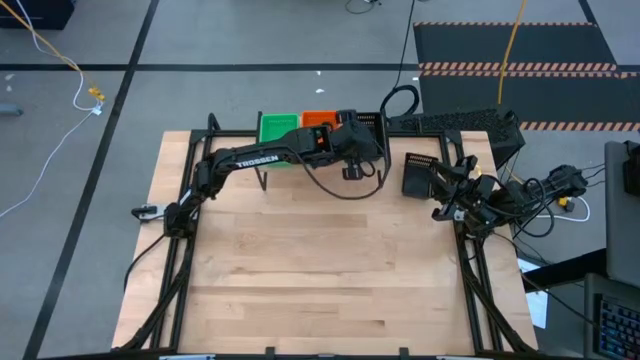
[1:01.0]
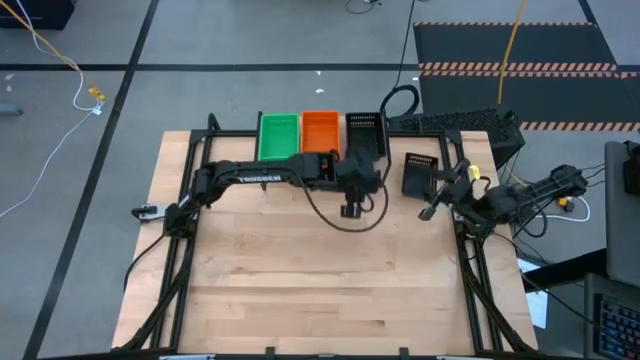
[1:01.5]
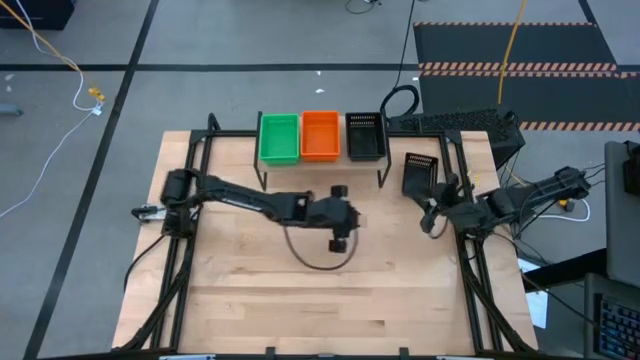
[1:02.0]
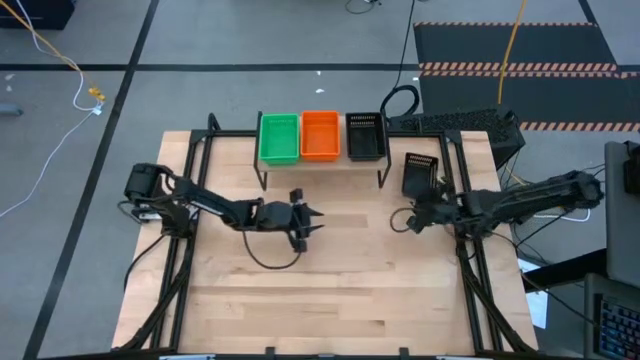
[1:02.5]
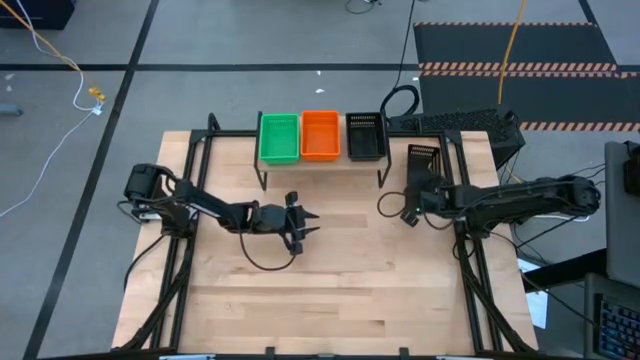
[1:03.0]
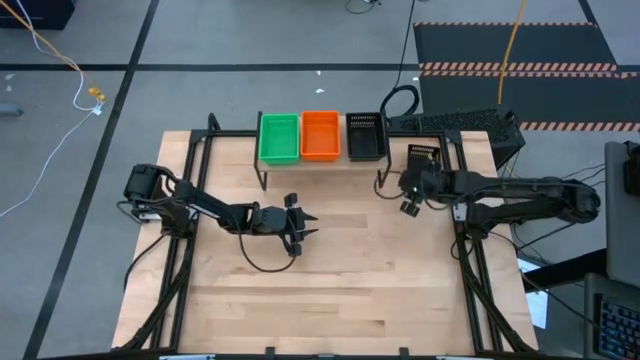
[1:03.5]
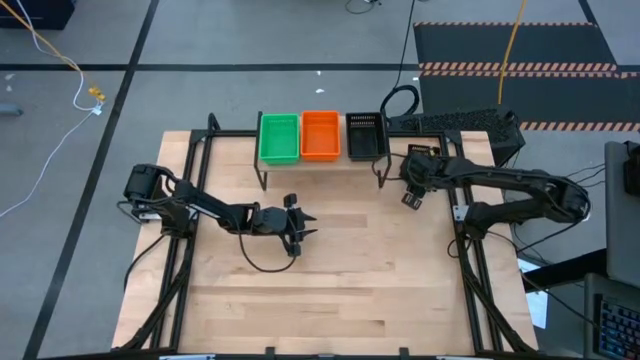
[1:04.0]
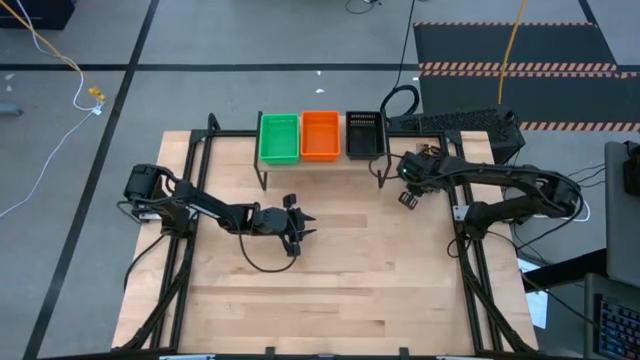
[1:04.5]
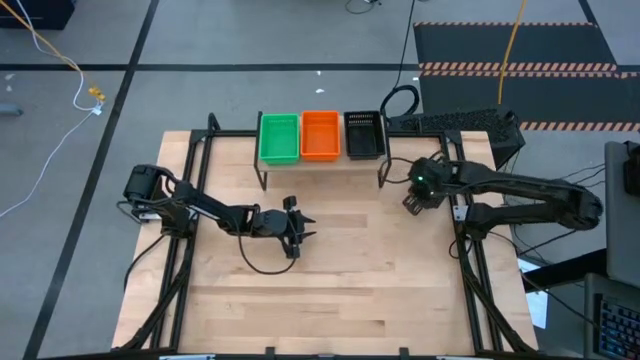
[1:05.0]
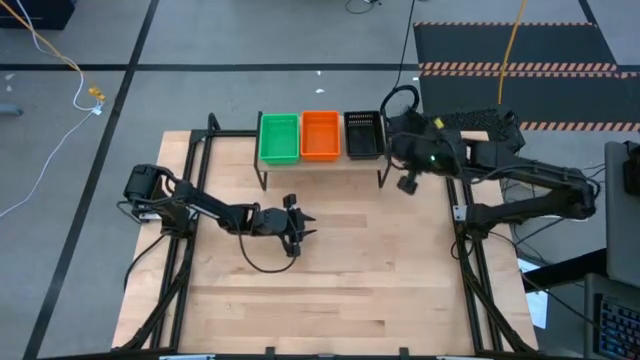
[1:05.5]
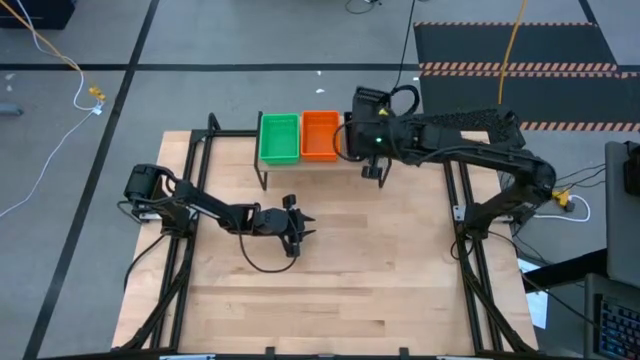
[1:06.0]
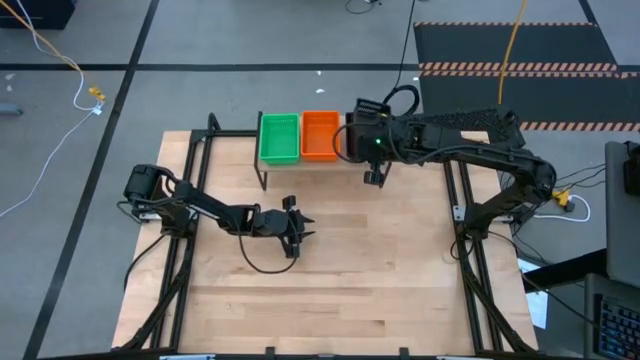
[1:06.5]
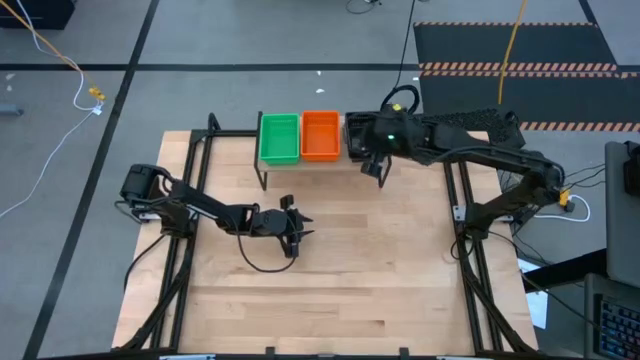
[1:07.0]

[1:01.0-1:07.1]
Task: Stack baskets on shelf by color
Stack the black bin on top of the black bins on the shelf

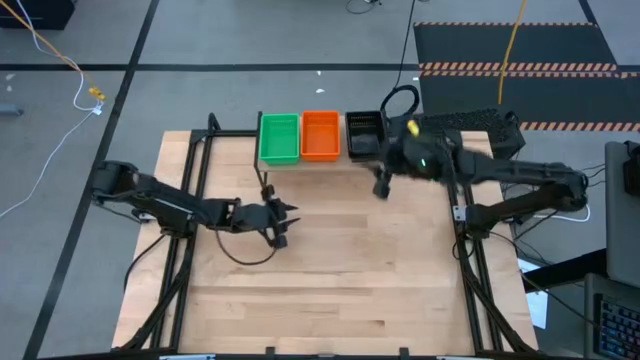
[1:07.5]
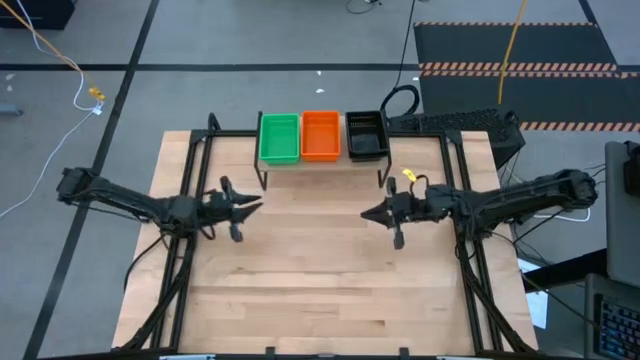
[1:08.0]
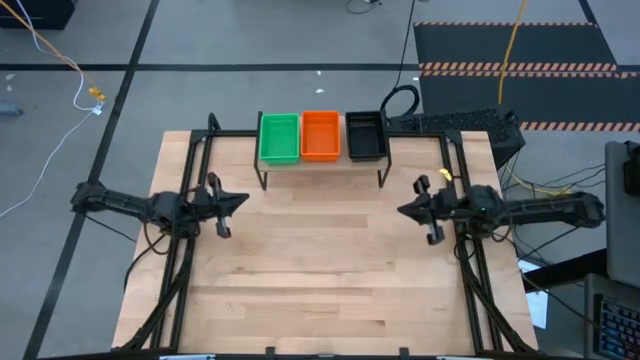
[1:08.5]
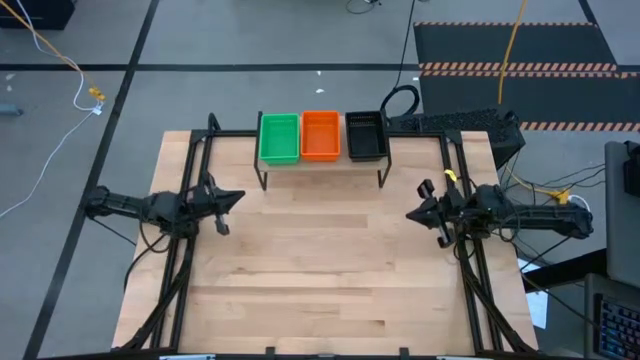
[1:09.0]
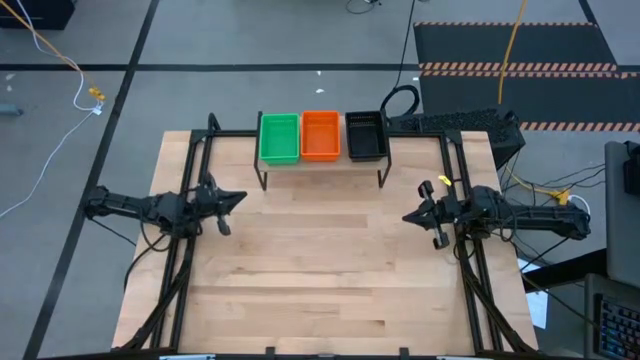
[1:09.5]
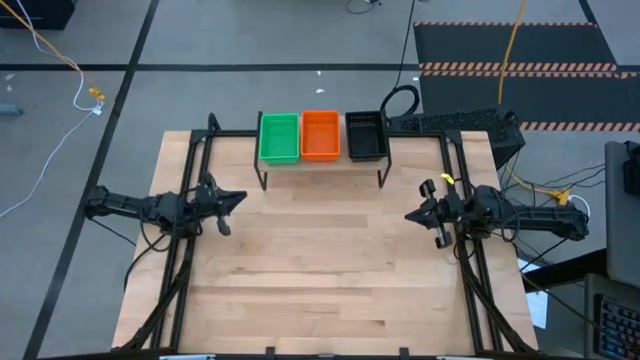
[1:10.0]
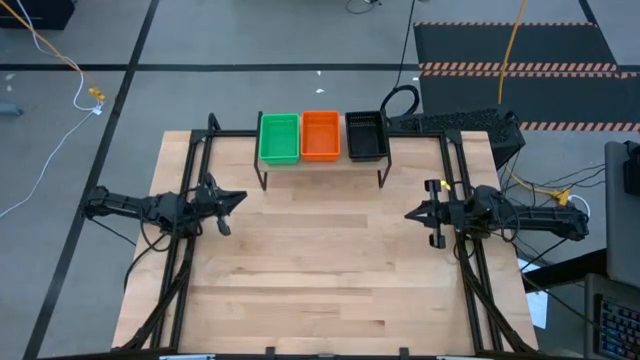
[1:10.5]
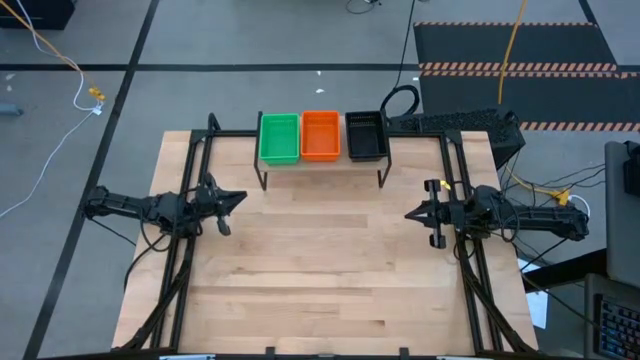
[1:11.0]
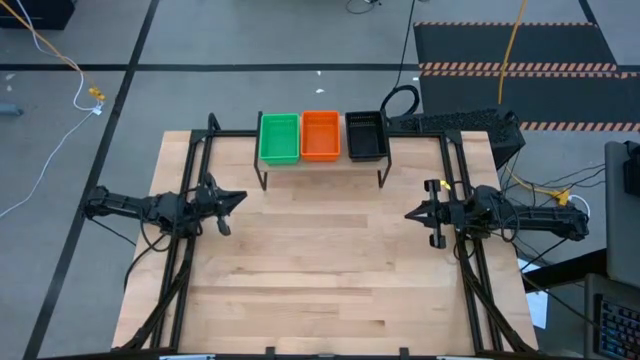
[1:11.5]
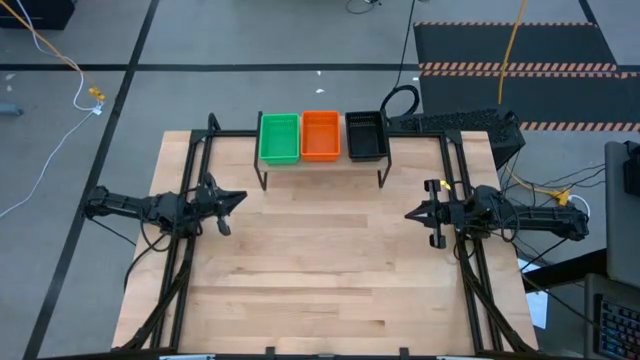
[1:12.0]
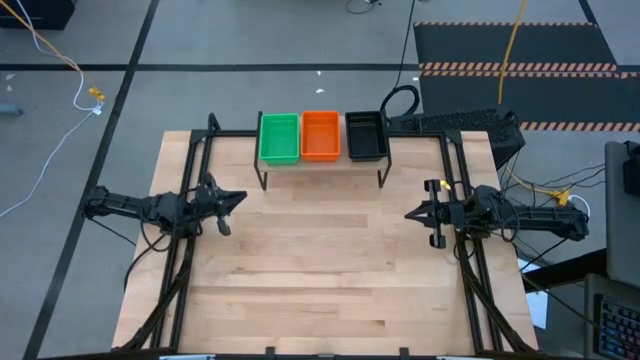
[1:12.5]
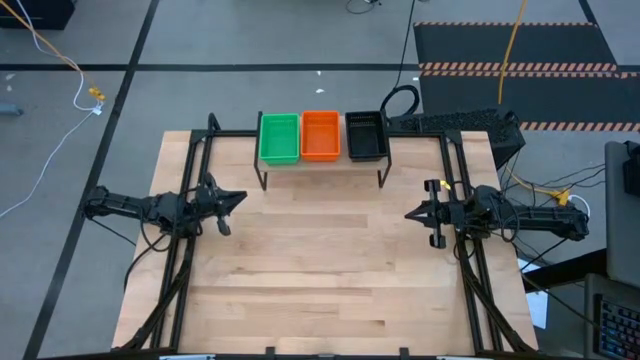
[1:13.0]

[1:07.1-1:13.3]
Return to Home Position

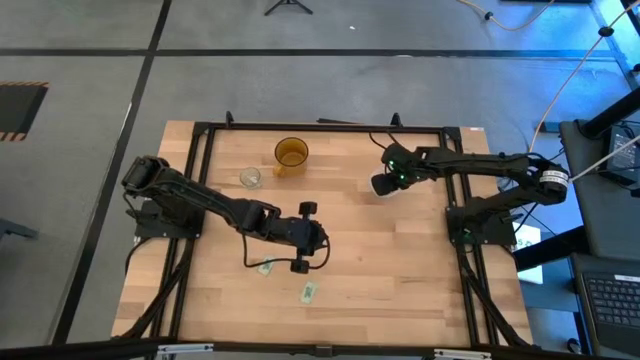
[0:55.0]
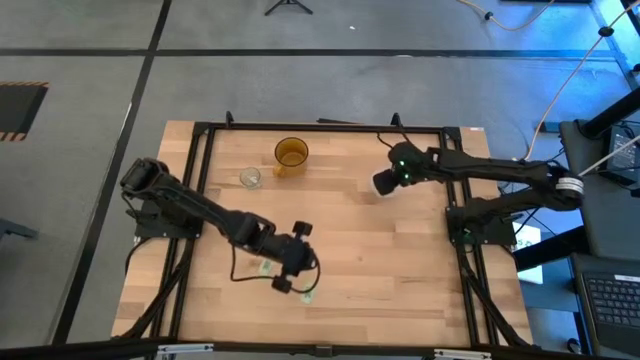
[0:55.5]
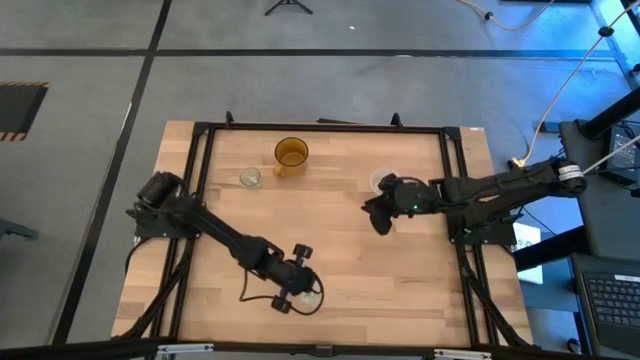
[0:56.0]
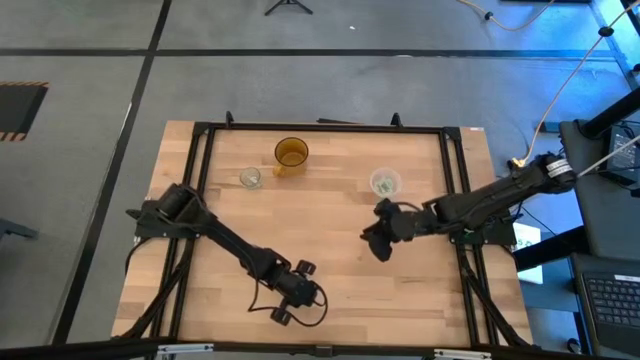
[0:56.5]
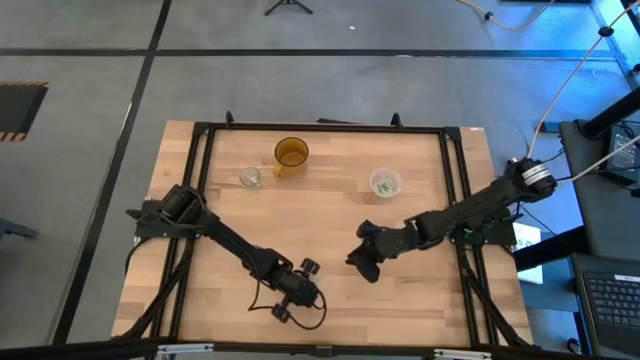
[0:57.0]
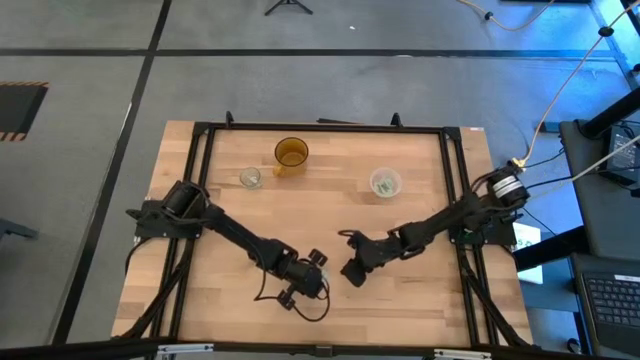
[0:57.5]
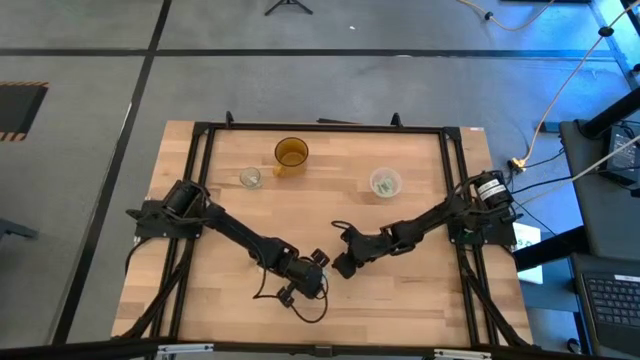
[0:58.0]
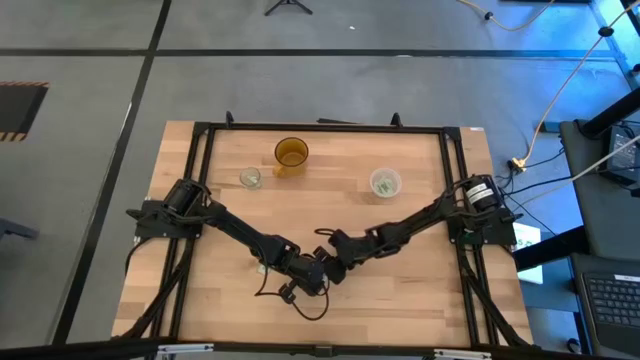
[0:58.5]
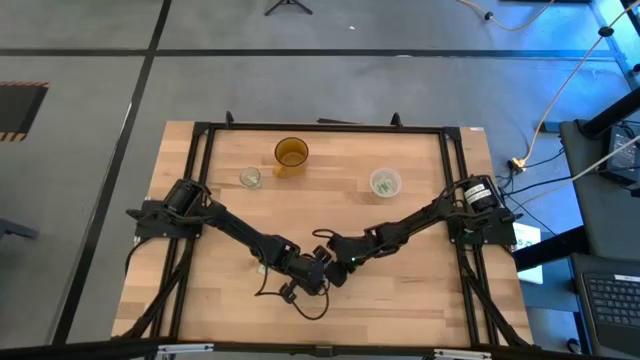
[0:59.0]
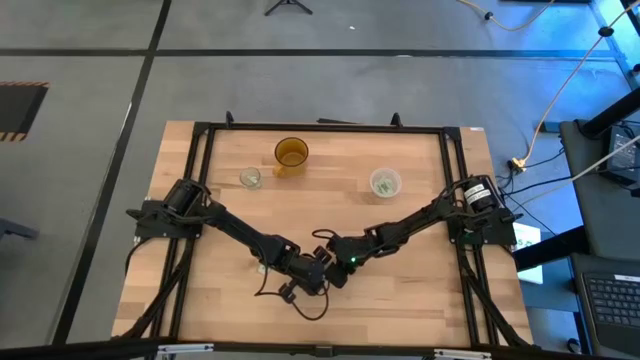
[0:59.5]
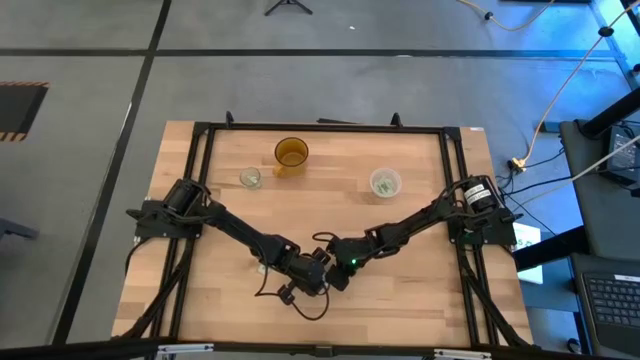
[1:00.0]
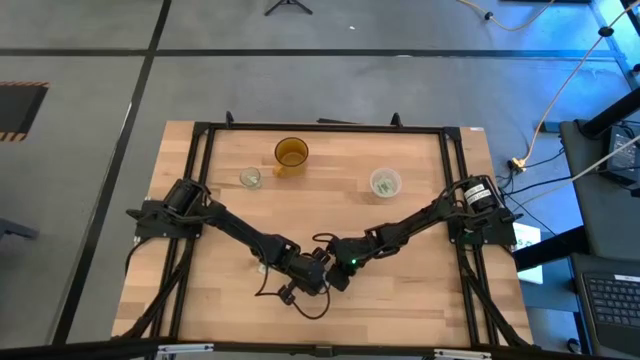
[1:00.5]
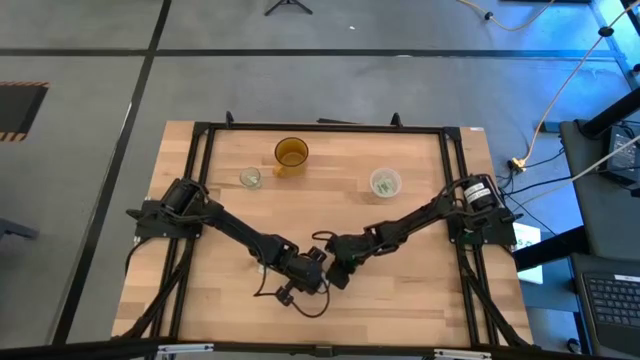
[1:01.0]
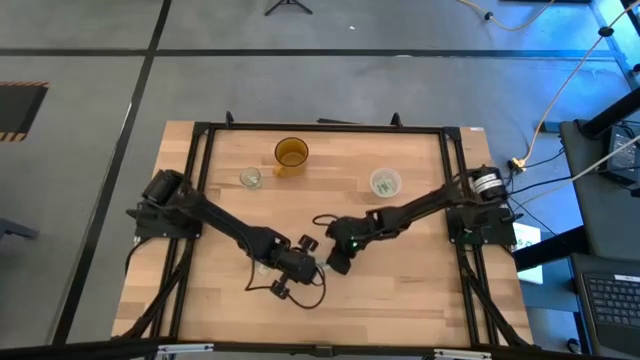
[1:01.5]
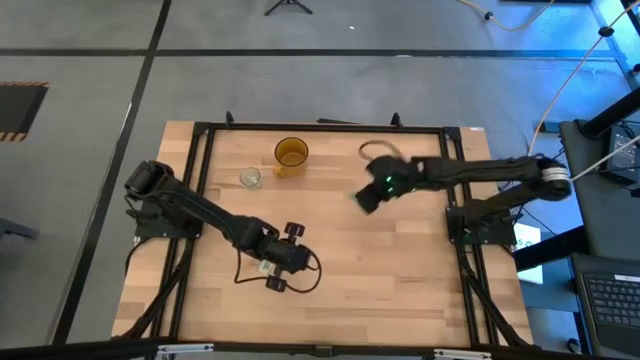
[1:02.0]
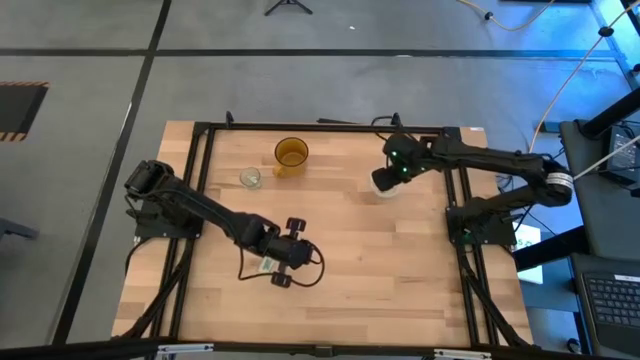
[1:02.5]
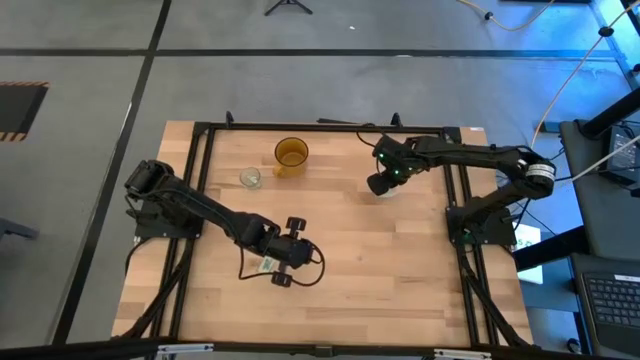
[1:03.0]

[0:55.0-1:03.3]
Task: Pick and place Stevia / Truvia into bins
Put the stevia packet into the transparent container
